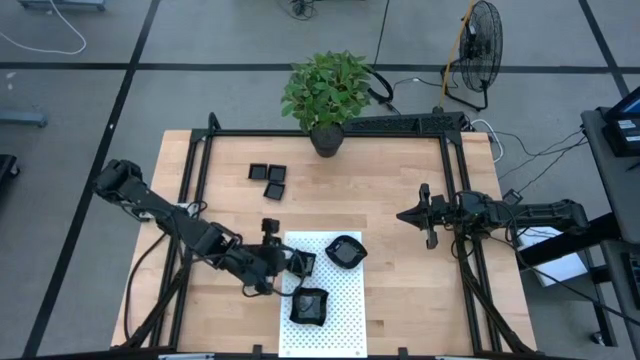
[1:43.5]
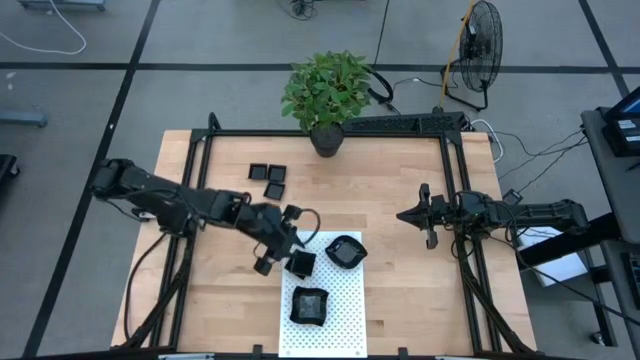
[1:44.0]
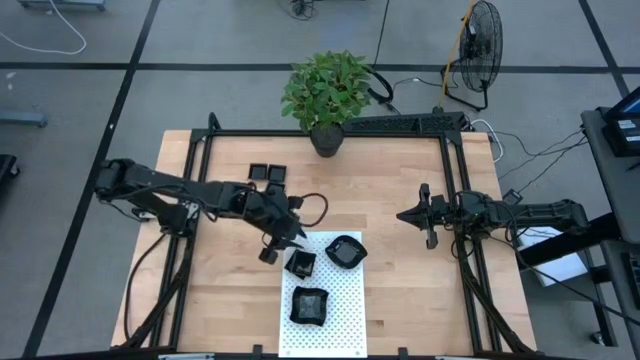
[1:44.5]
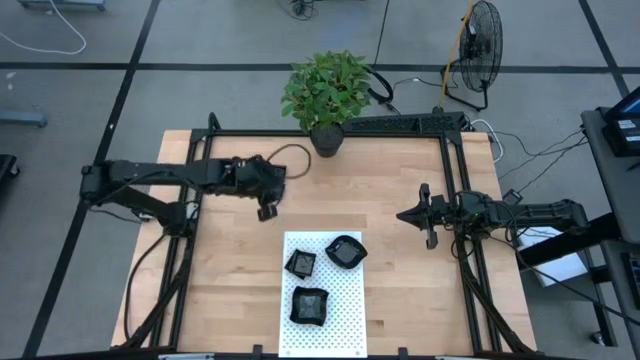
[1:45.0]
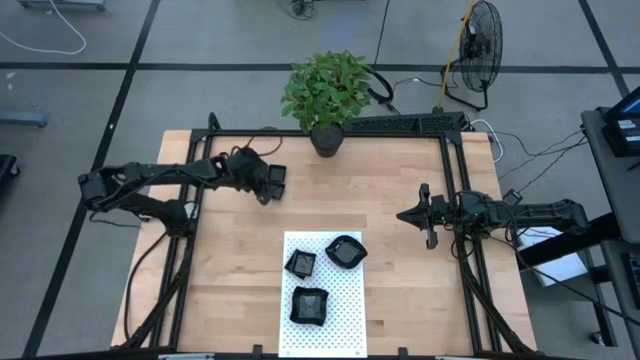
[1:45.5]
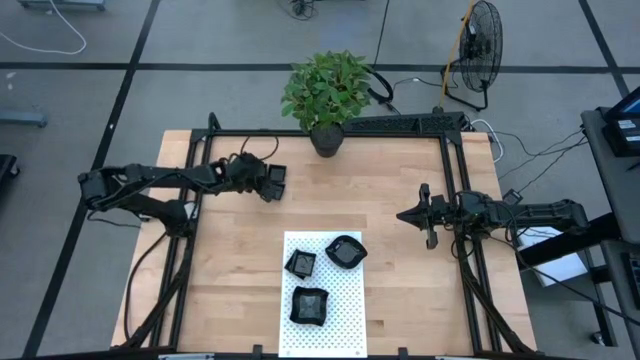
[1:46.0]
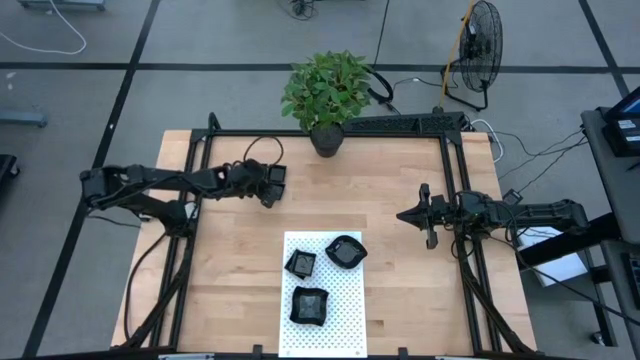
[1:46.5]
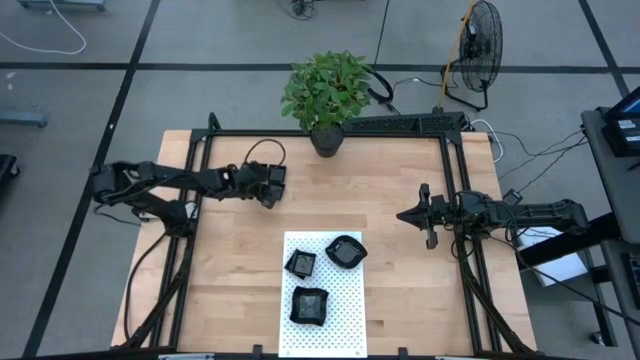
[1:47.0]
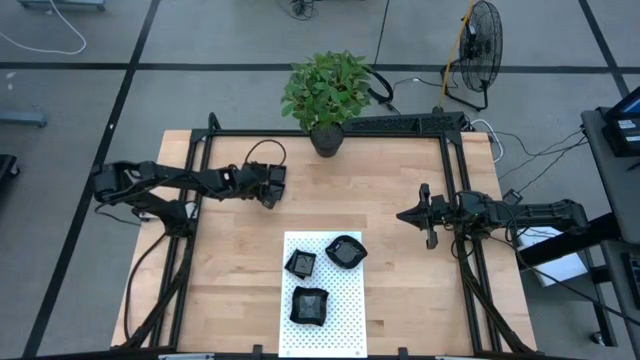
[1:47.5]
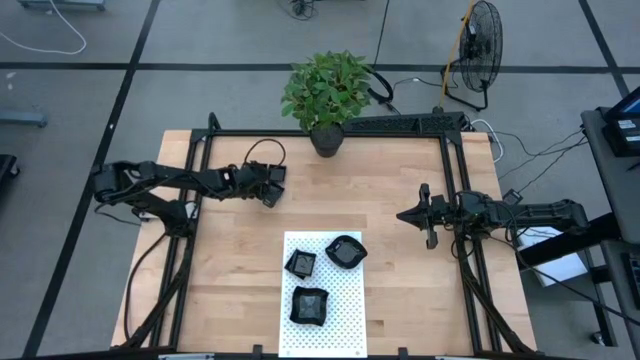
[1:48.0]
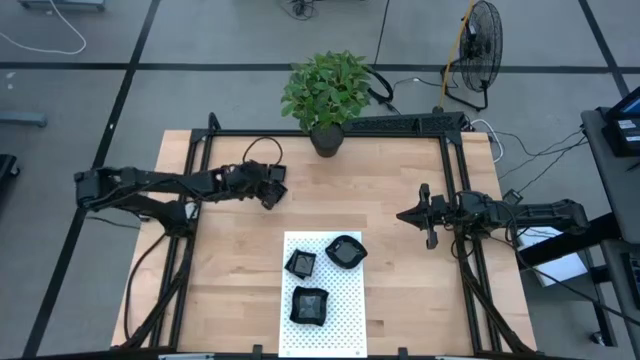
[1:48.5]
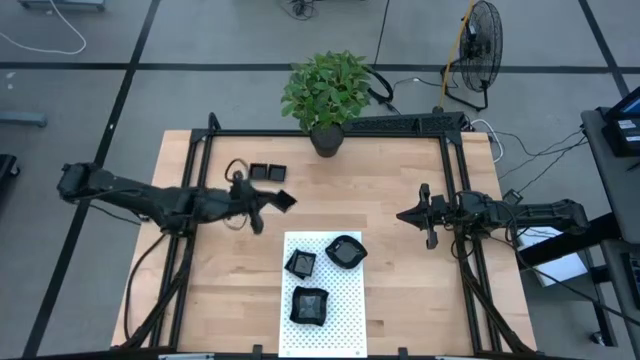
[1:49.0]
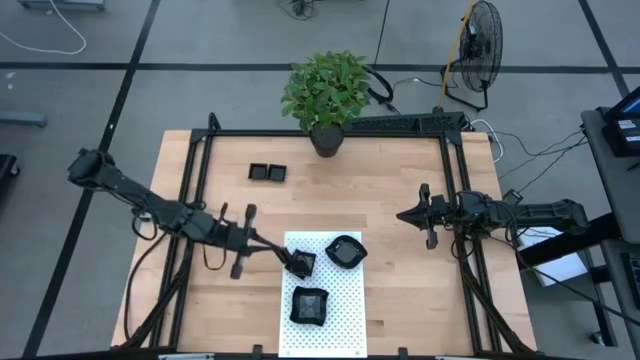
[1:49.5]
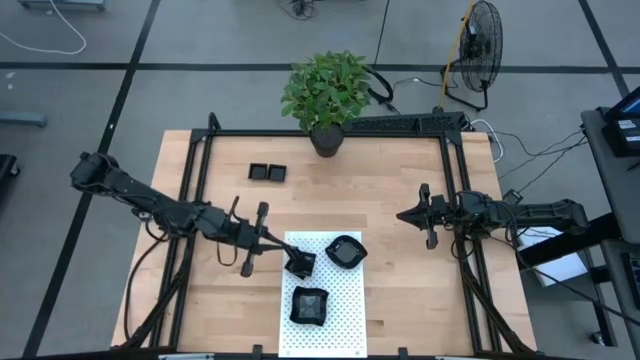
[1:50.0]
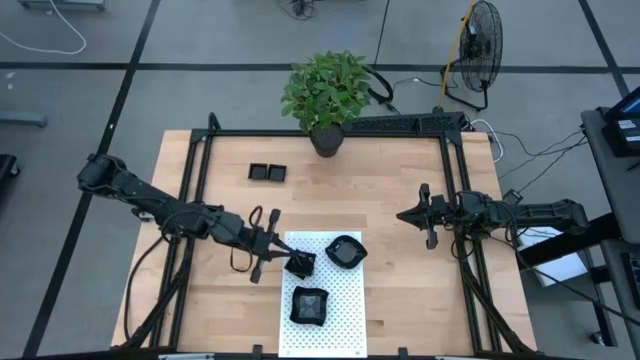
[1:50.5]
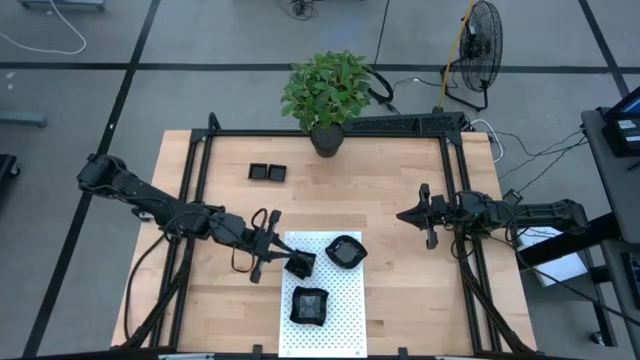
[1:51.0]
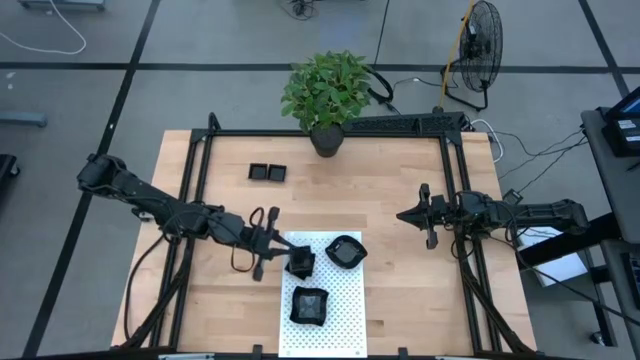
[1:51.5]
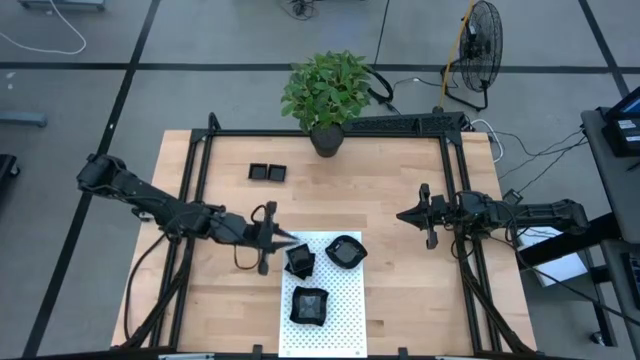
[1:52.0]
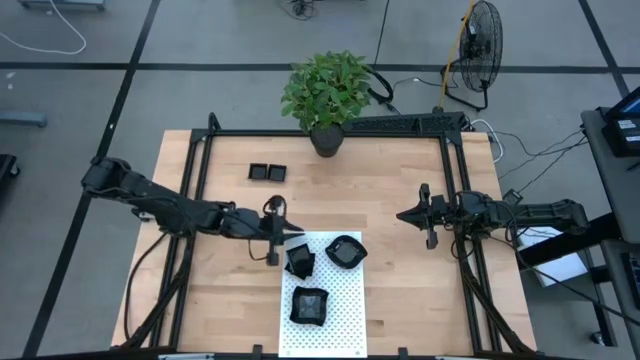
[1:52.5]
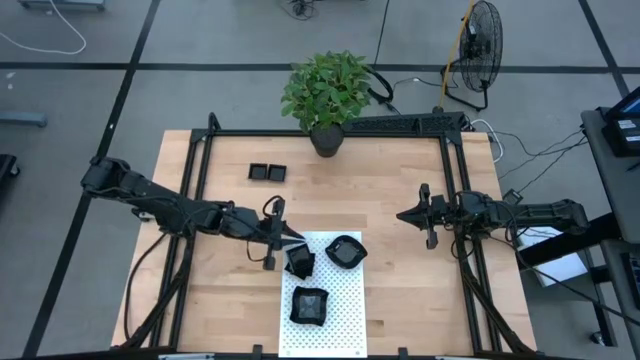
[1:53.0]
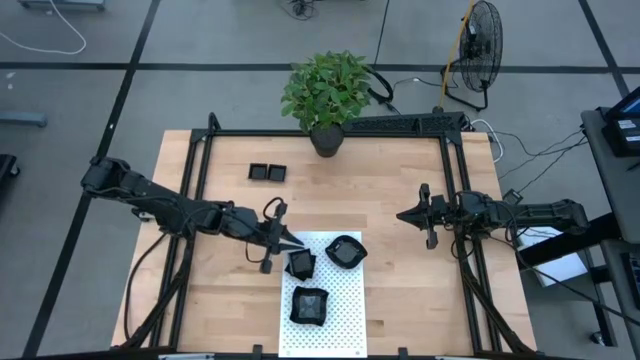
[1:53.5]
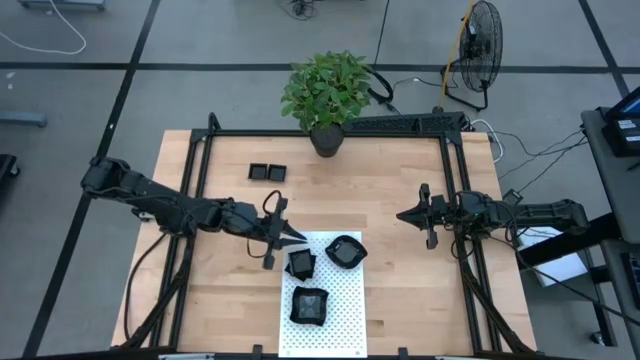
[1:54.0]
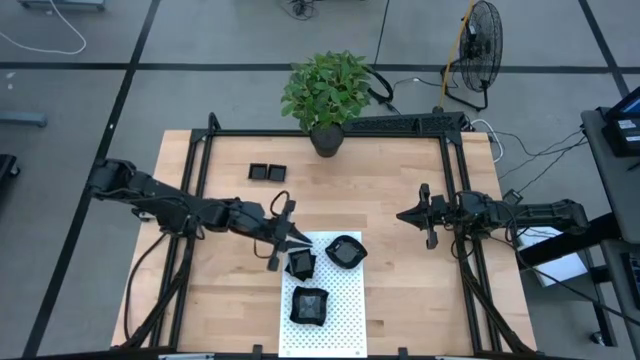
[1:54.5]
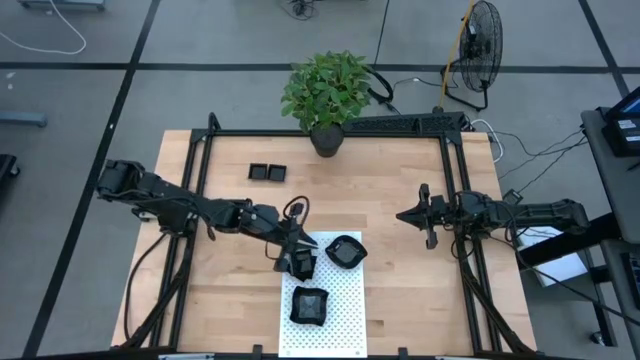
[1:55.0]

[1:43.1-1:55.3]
Task: Pick & Place Mini shaped plates
Stack the bottom square plate on top of the square plate on the shelf

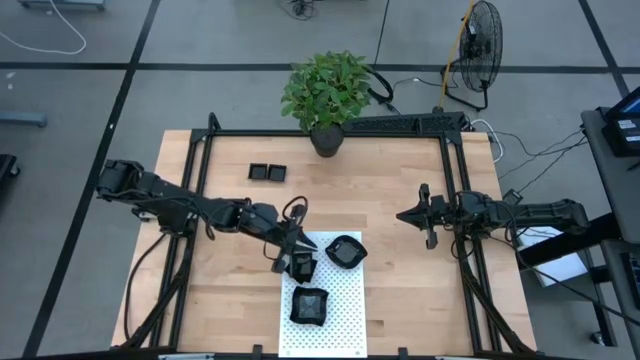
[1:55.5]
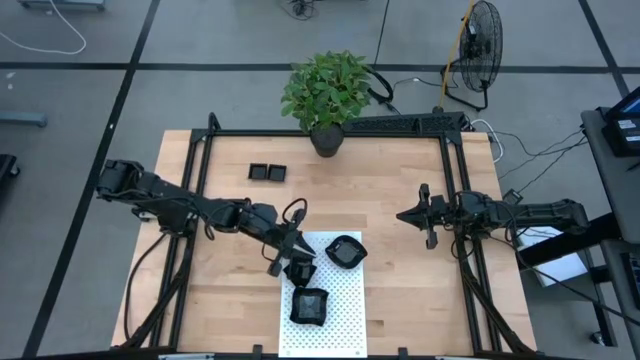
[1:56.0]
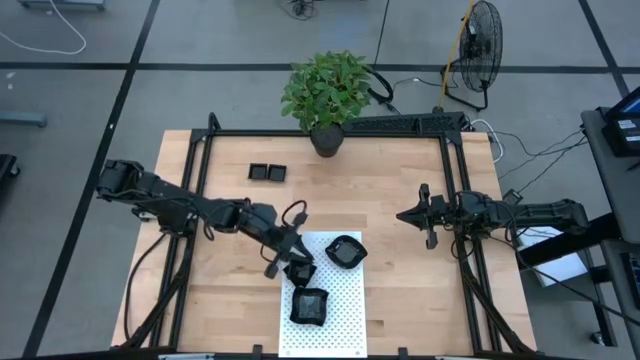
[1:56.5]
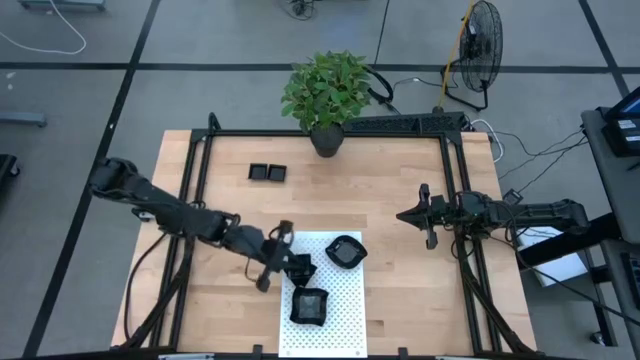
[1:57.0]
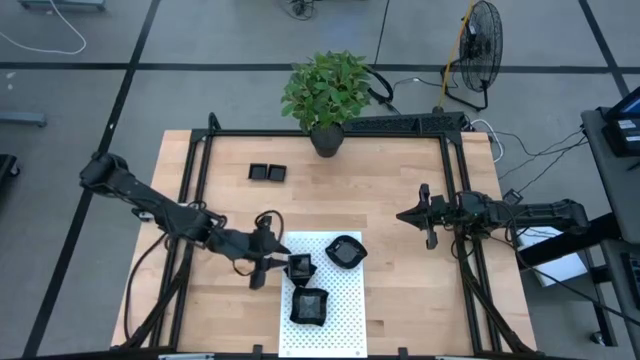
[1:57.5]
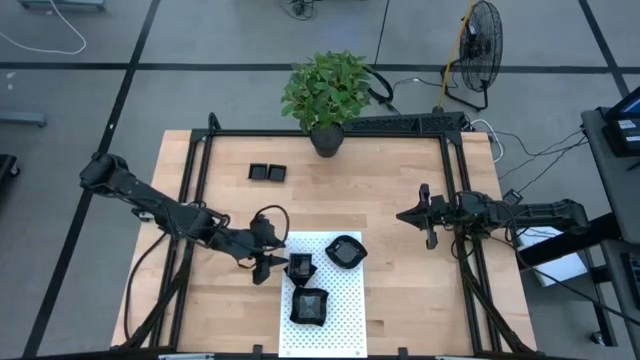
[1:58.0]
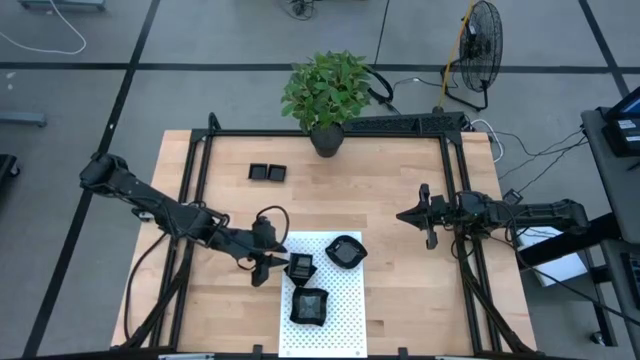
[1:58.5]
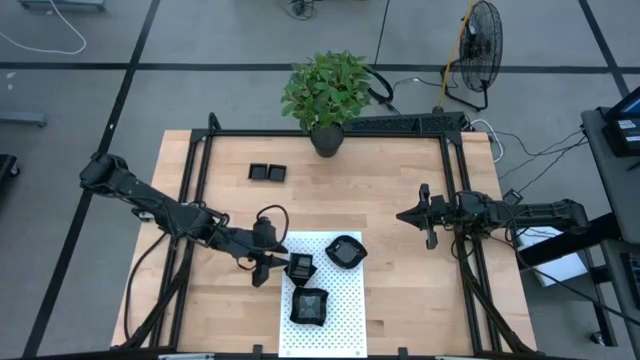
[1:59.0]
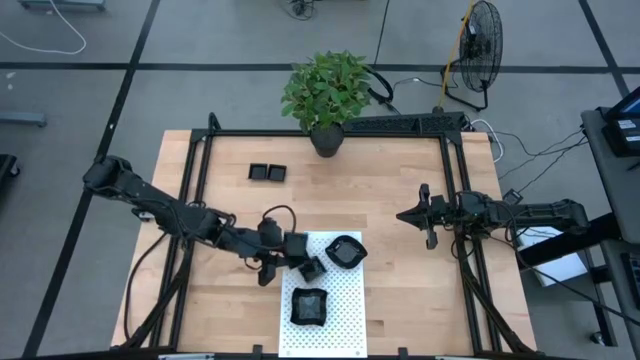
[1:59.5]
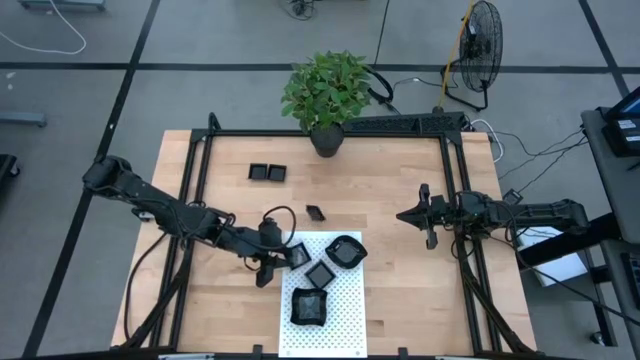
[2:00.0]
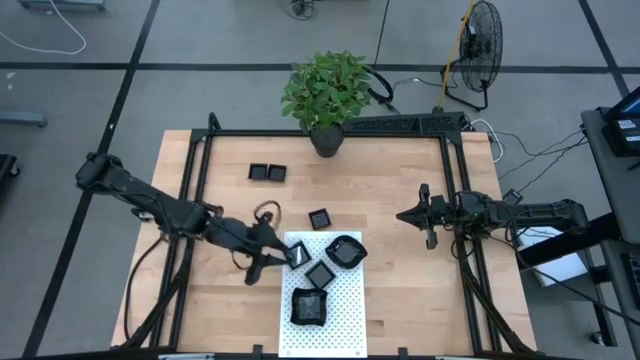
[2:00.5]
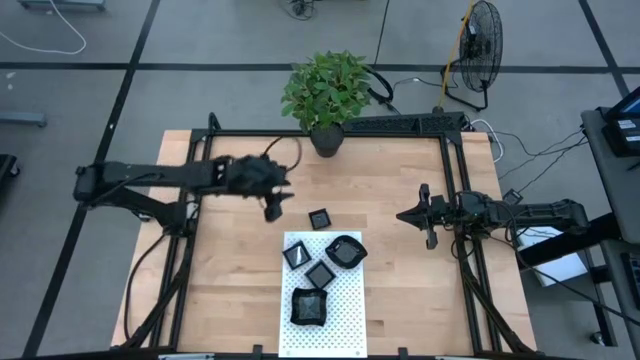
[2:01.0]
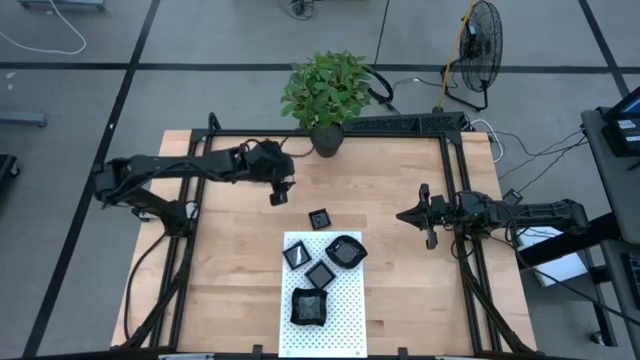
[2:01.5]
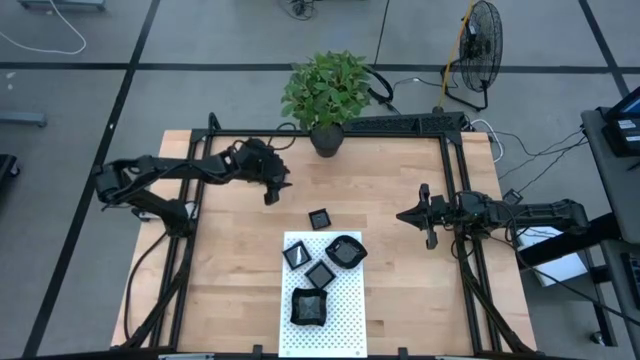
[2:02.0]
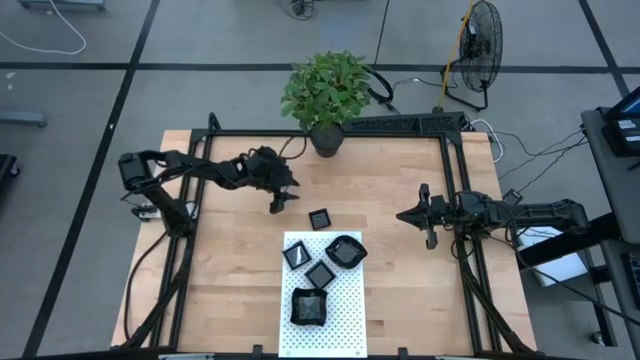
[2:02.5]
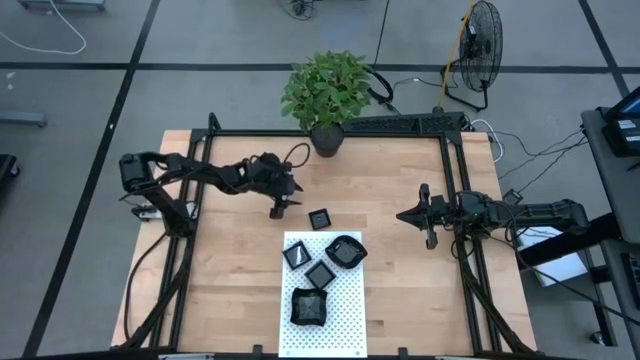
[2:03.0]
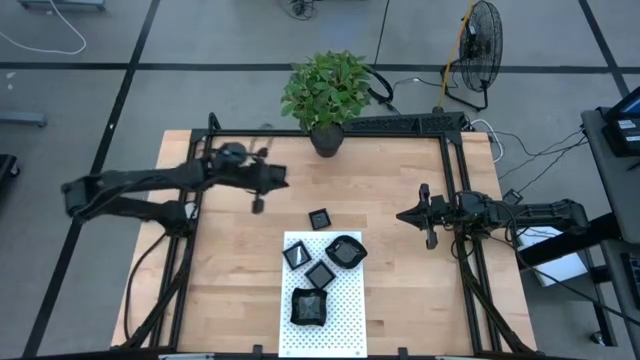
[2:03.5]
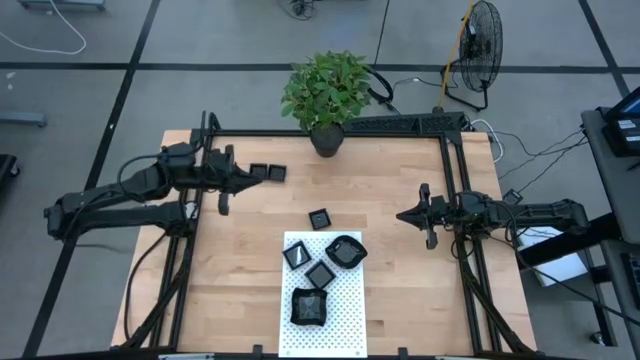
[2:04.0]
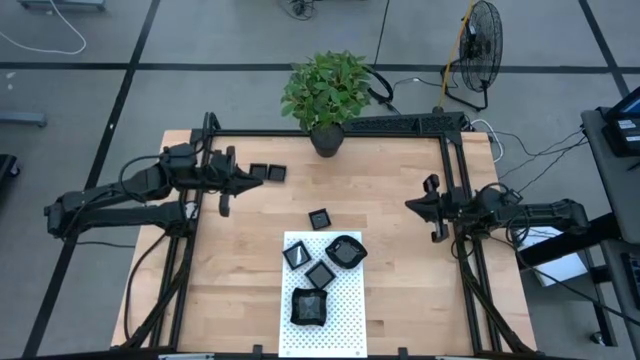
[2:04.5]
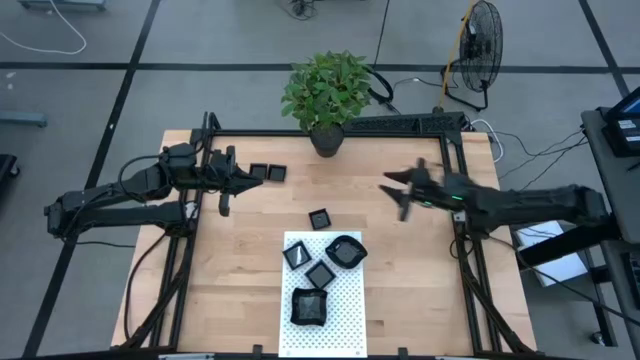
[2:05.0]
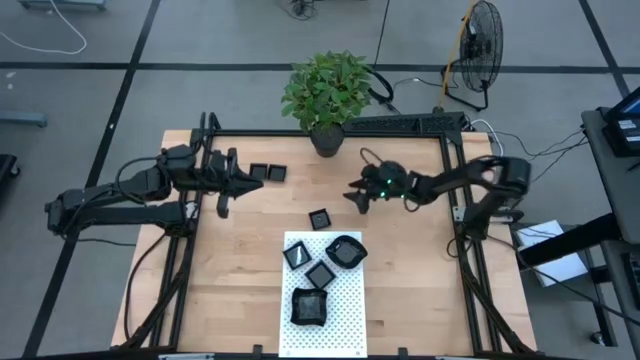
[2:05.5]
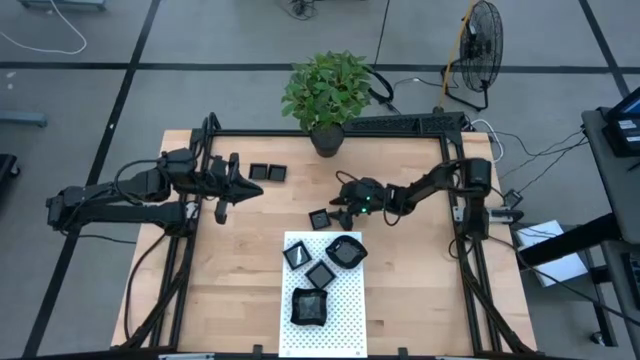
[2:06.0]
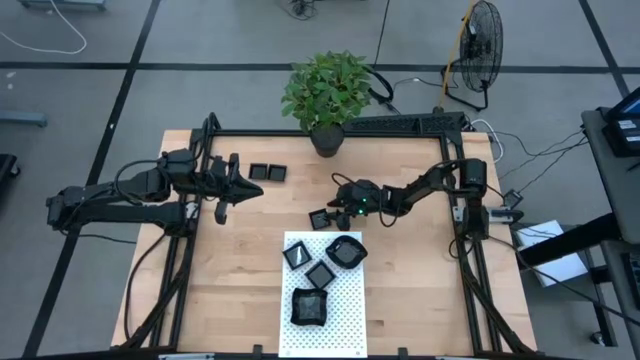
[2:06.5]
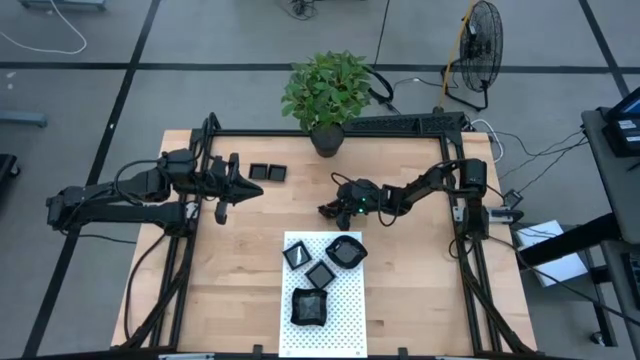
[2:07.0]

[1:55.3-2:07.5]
Stack the bottom square plate on top of the square plate on the shelf
